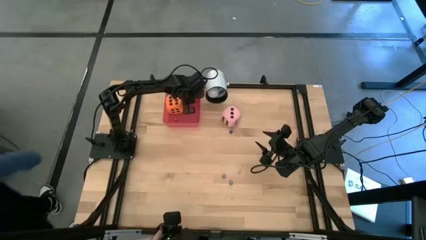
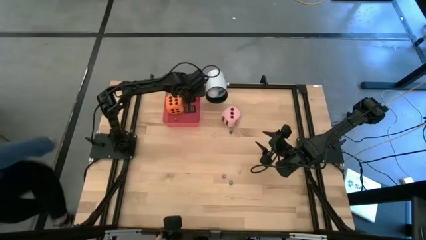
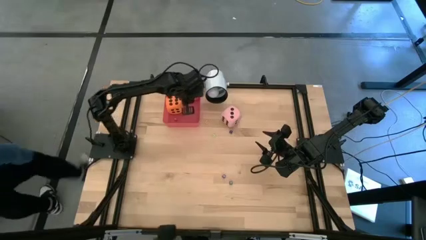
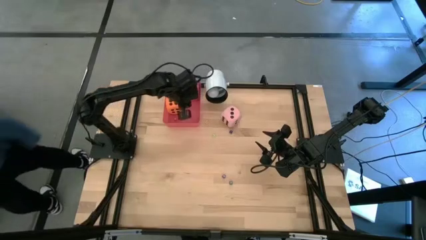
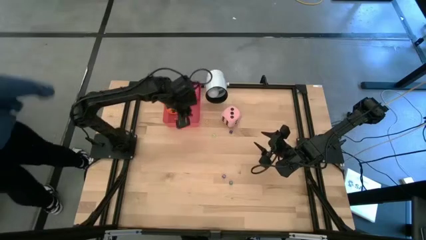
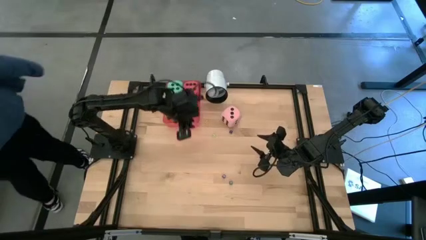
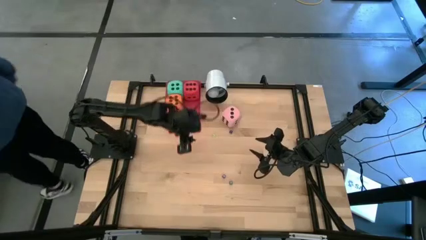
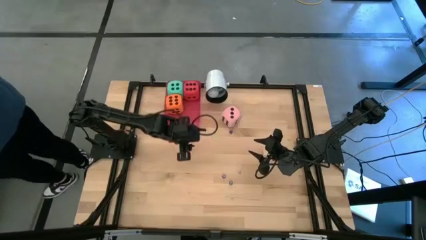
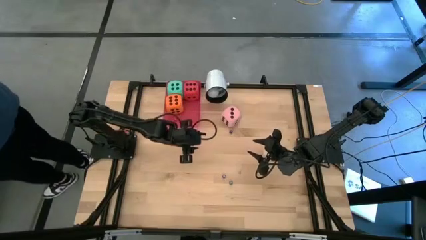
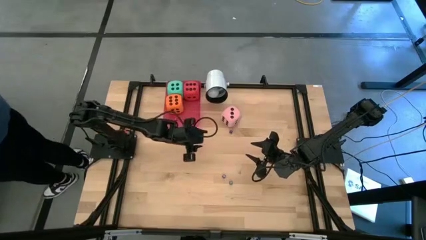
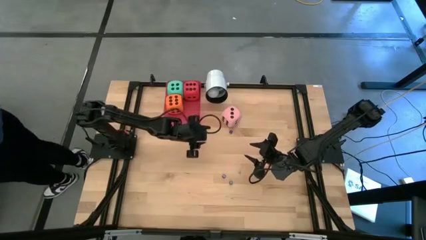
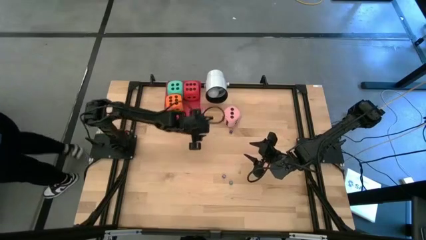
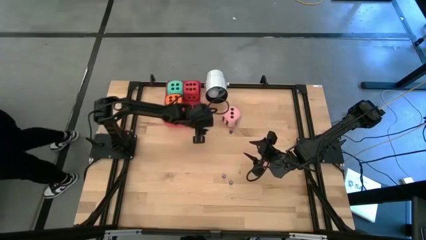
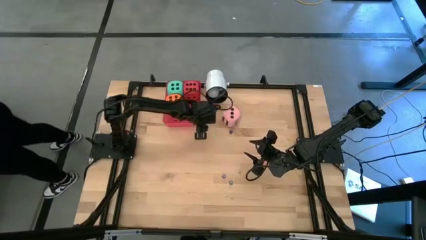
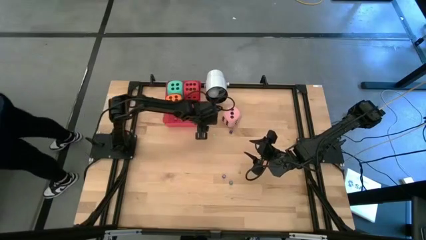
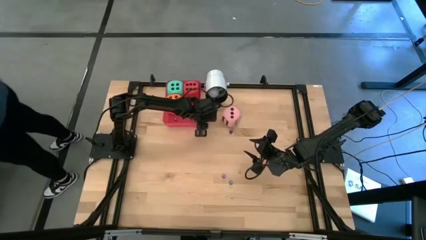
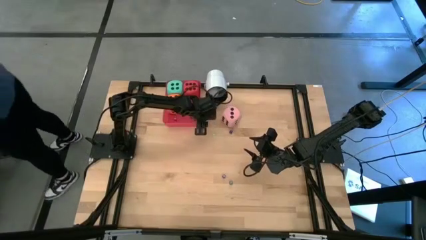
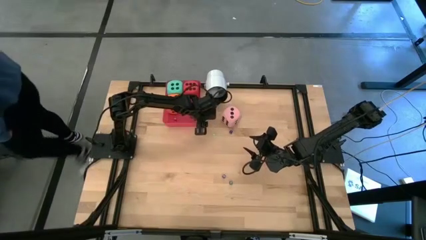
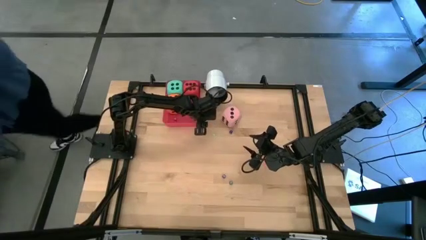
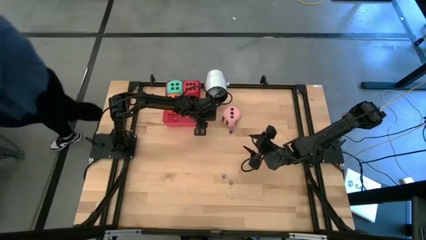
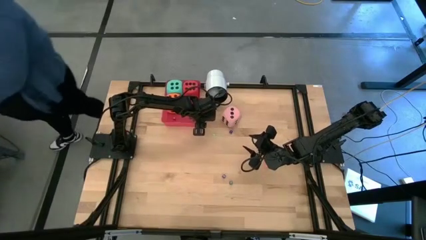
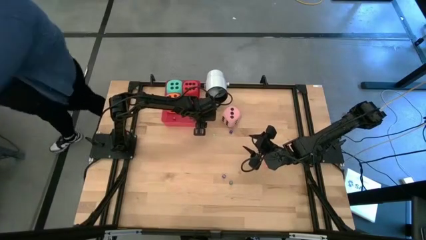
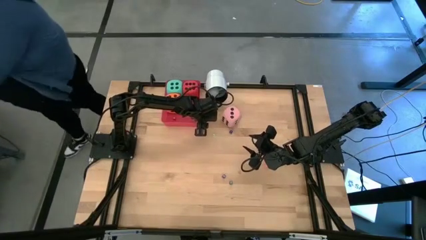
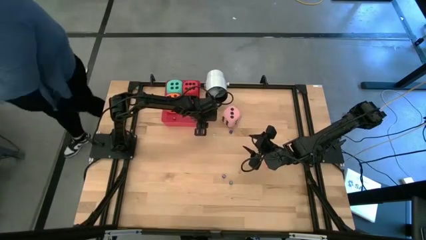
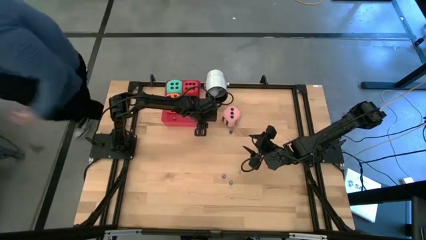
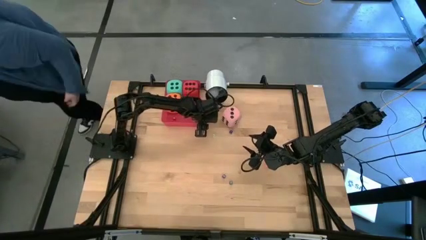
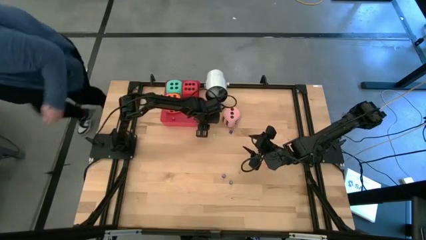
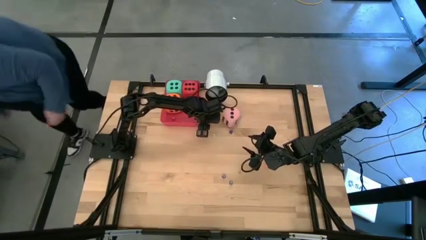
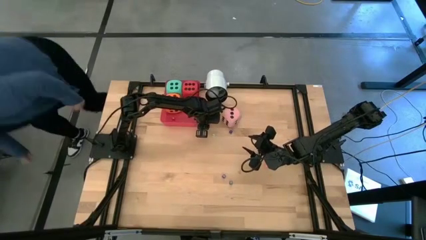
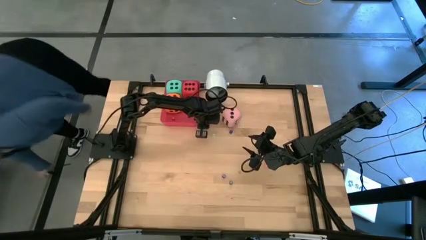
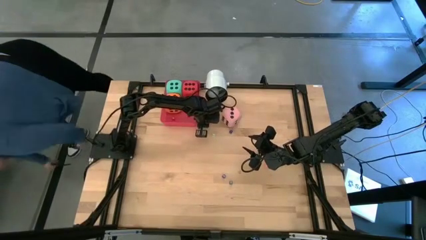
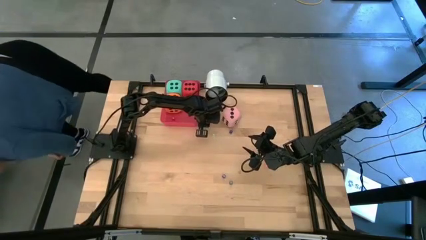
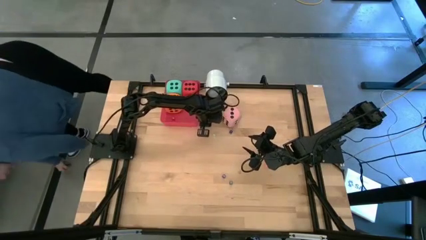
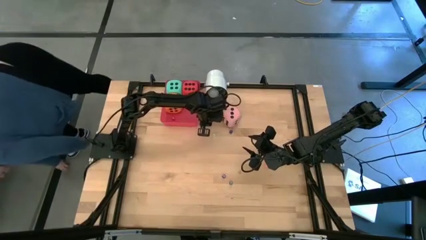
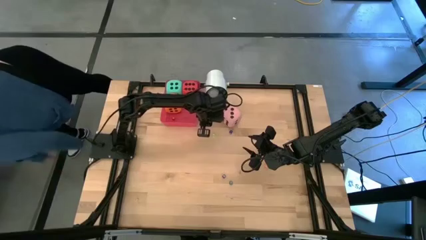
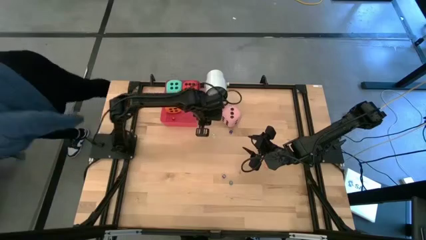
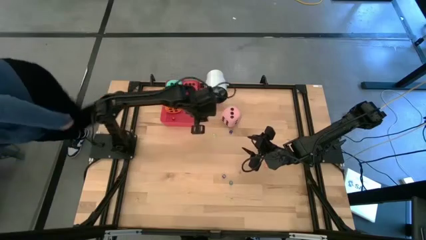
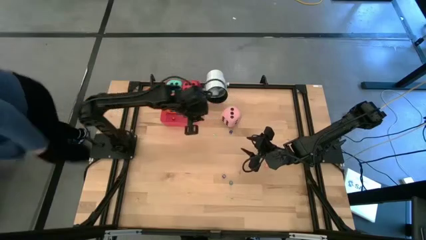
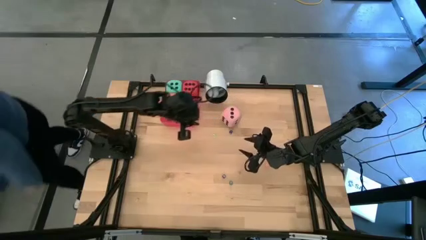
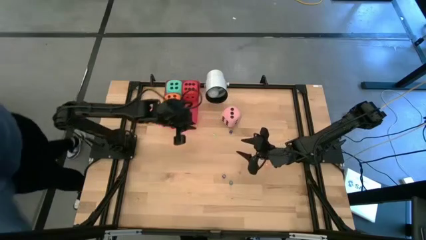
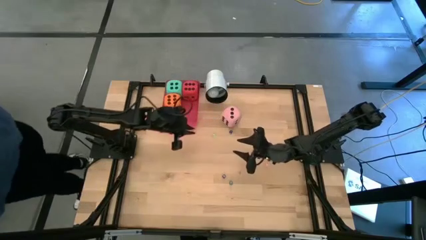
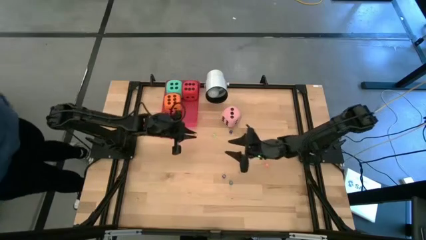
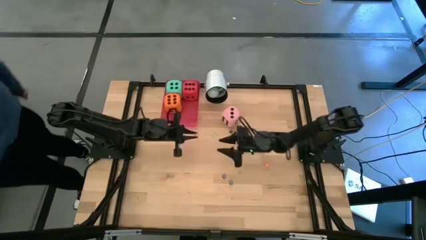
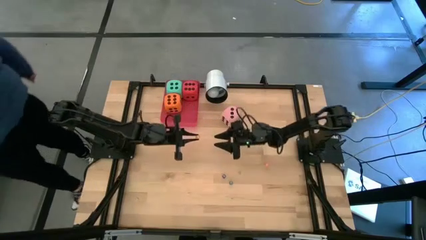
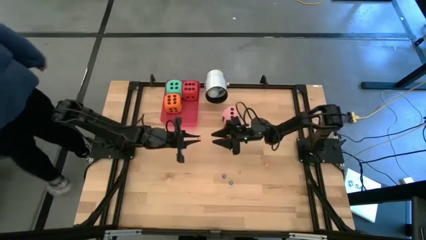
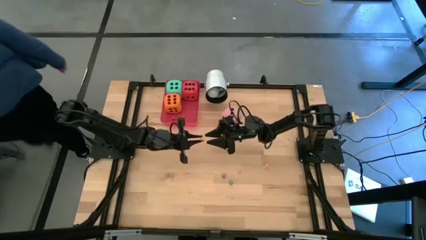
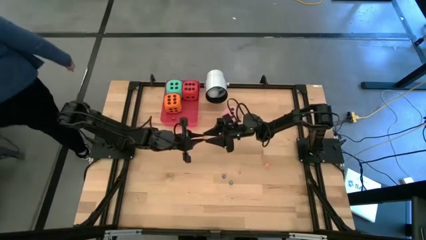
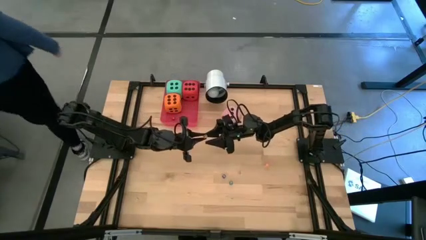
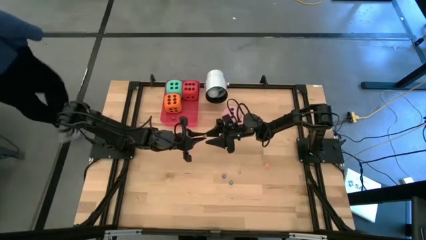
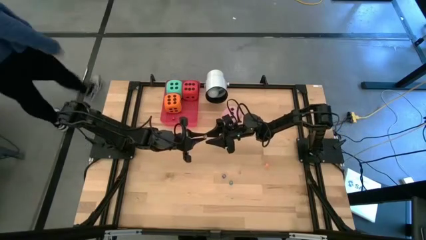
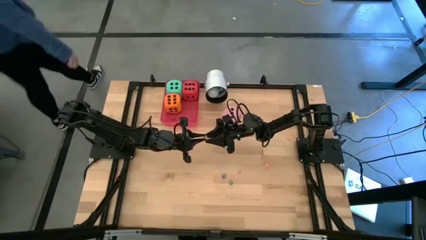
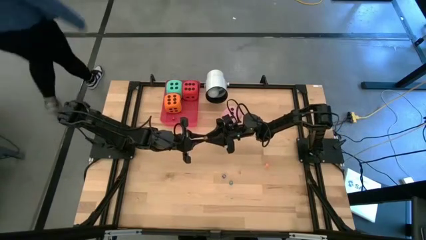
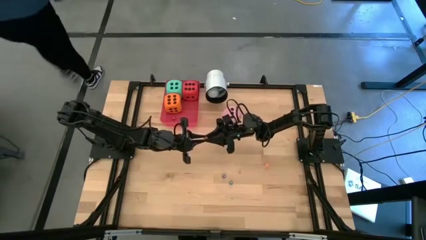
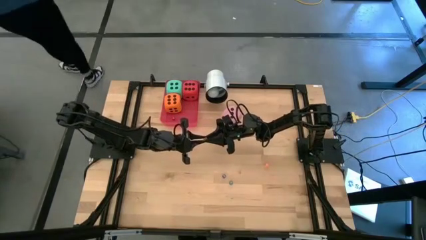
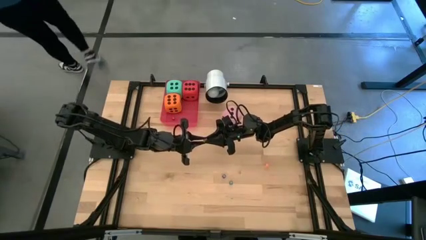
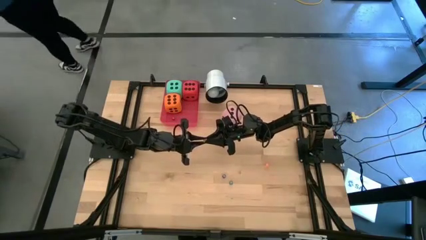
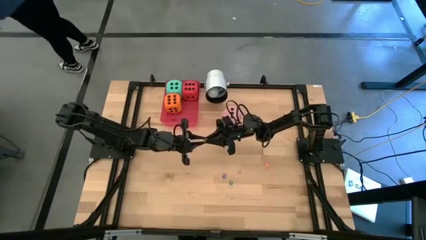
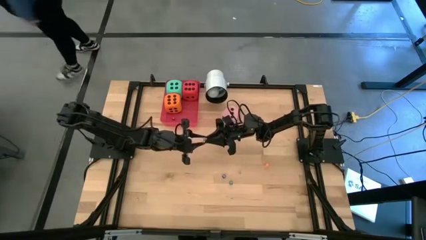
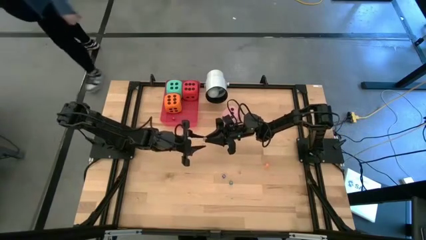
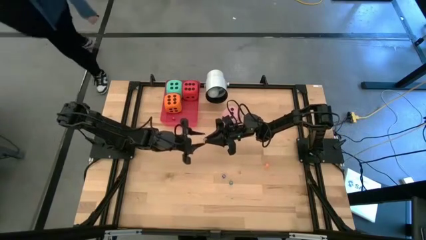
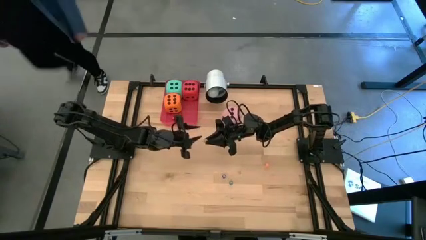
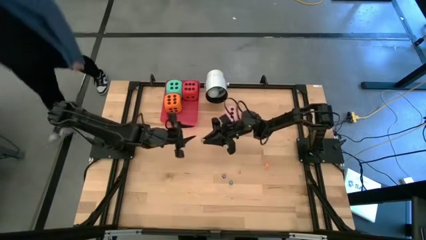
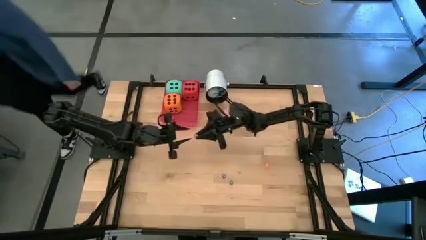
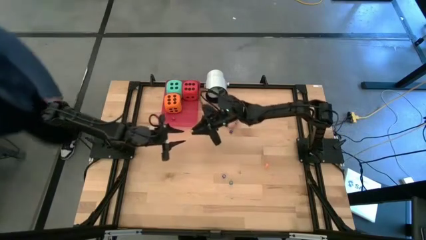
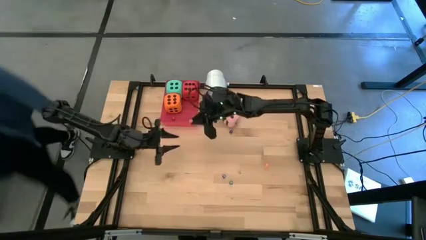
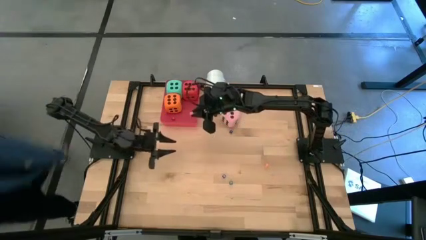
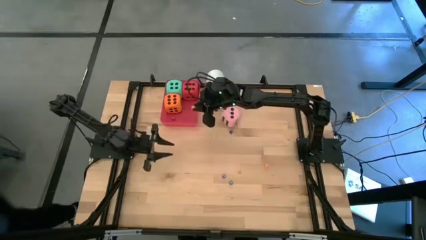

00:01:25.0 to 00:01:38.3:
Task: Pick & Place Dice
Put the small yellow dice into the red bin

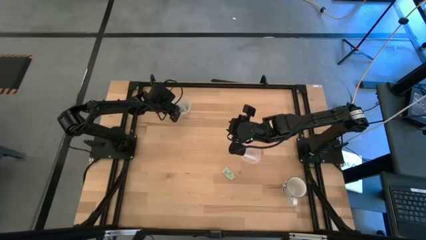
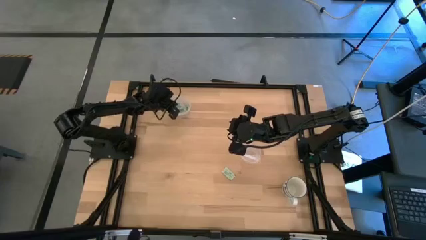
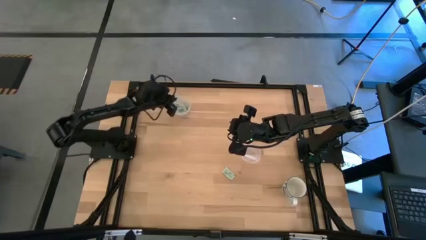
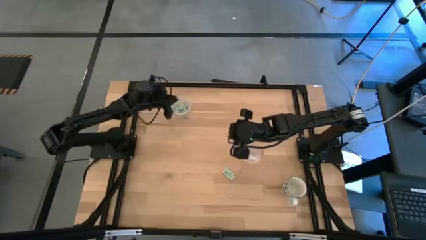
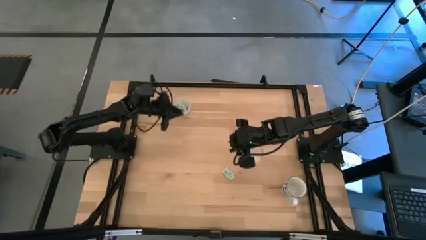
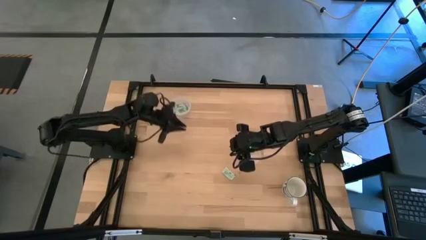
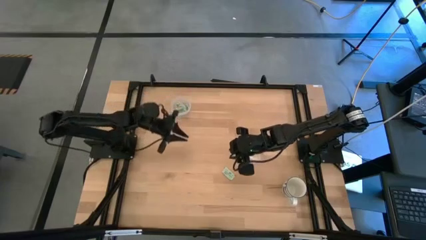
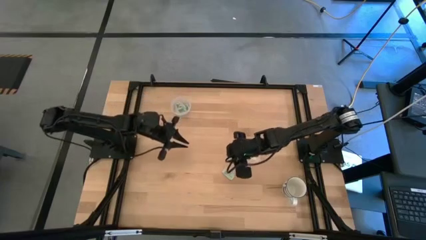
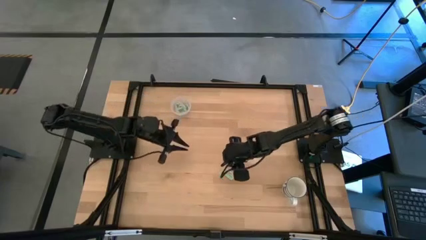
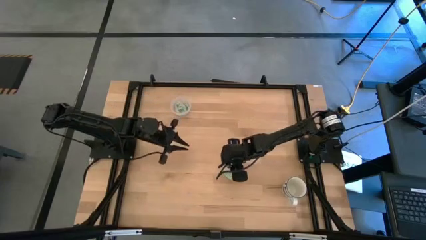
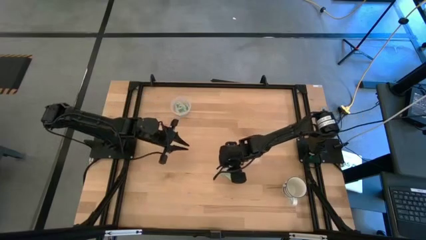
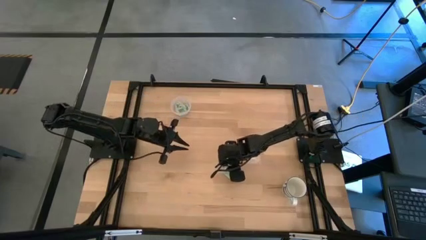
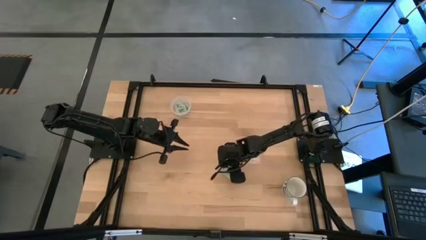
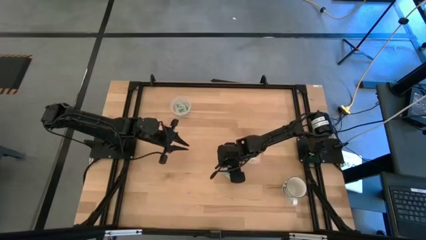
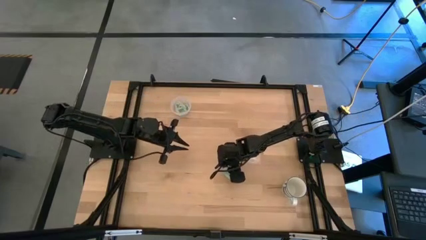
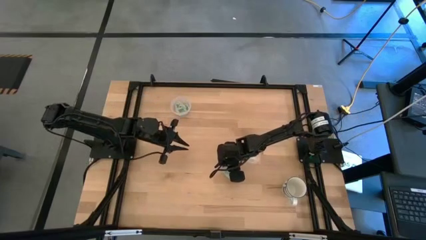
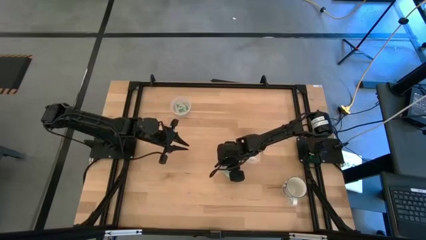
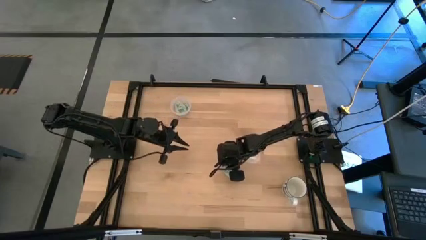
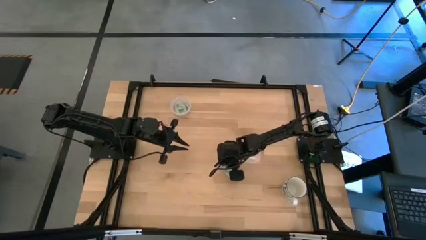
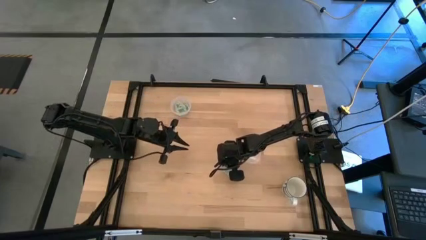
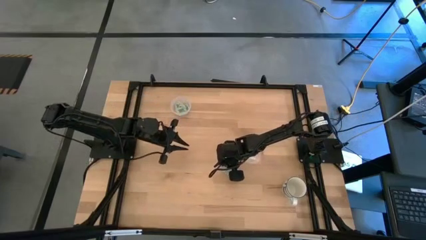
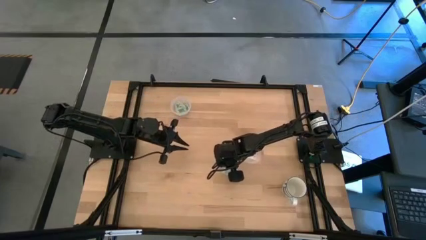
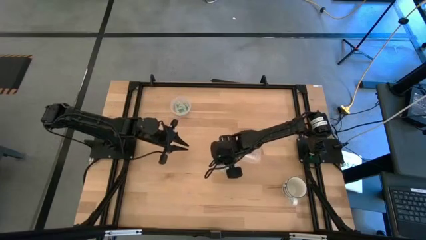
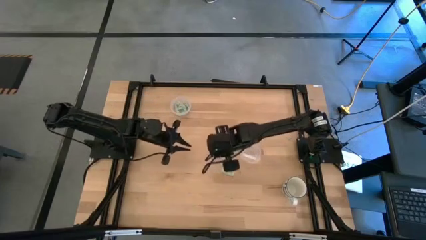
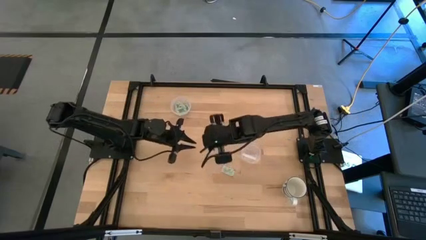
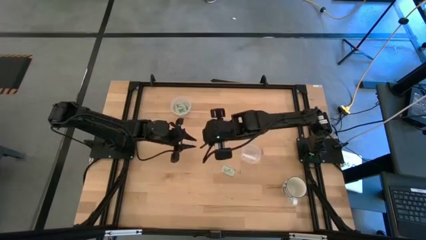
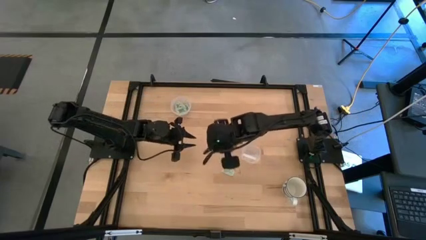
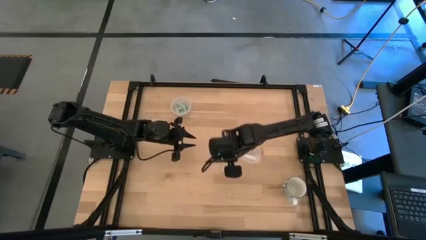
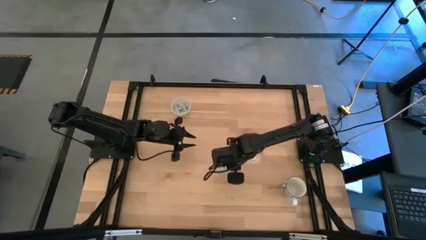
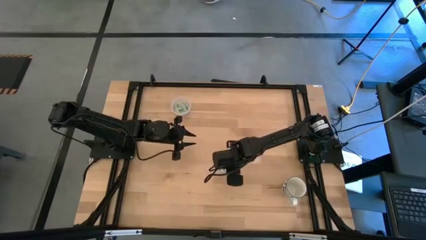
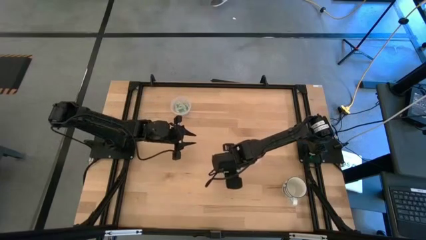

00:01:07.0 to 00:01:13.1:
Task: Pick and place Stevia / Truvia into bins
Put the stevia packet into the top transparent container
